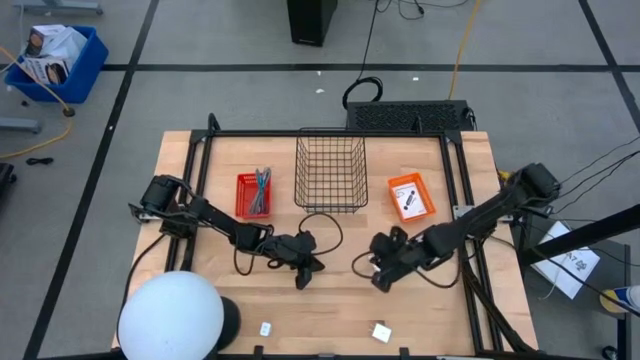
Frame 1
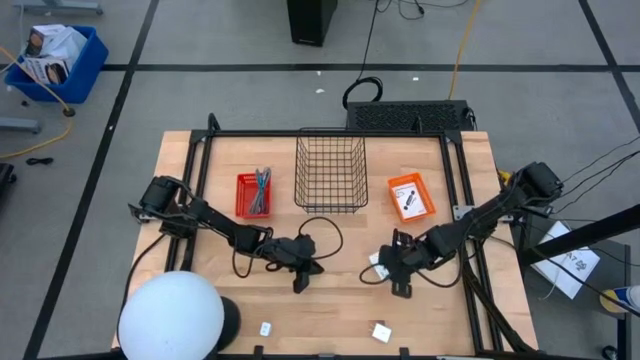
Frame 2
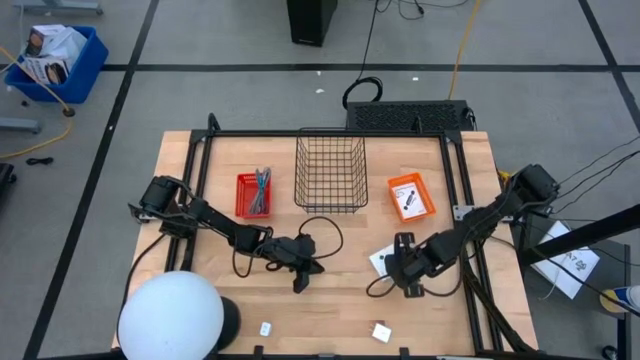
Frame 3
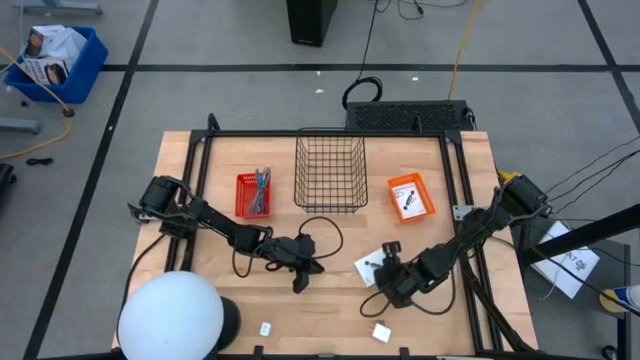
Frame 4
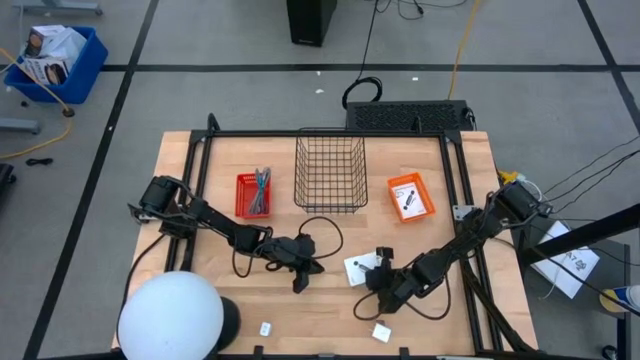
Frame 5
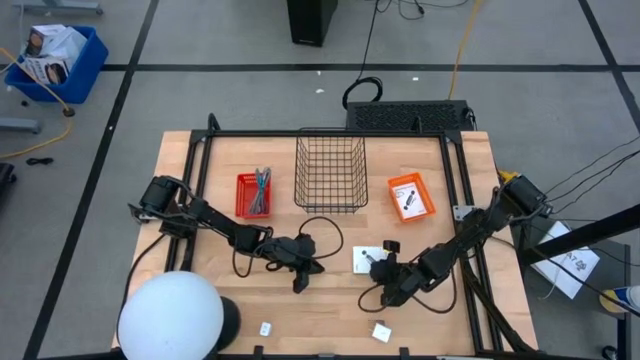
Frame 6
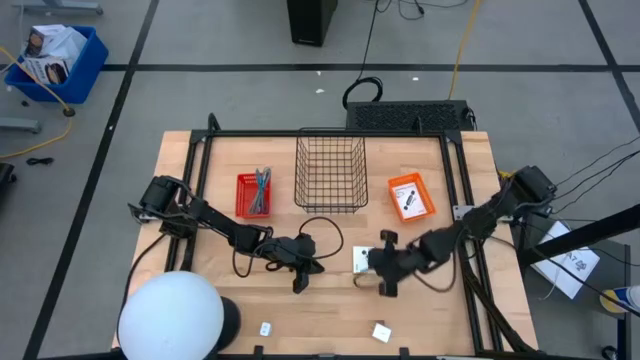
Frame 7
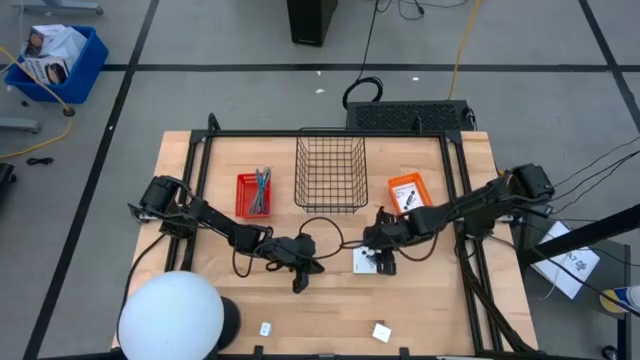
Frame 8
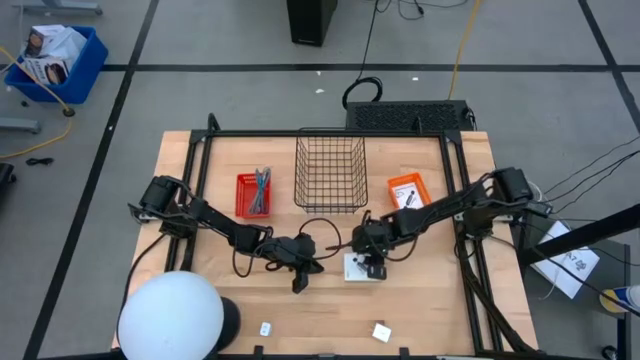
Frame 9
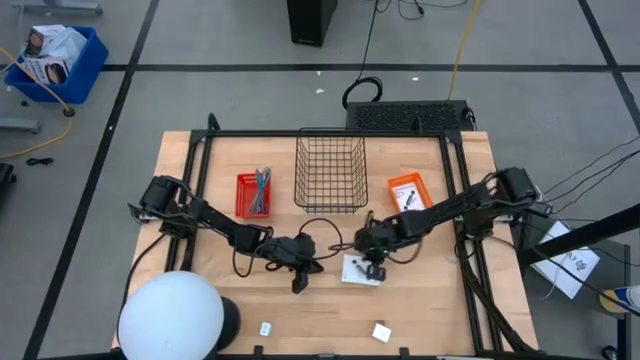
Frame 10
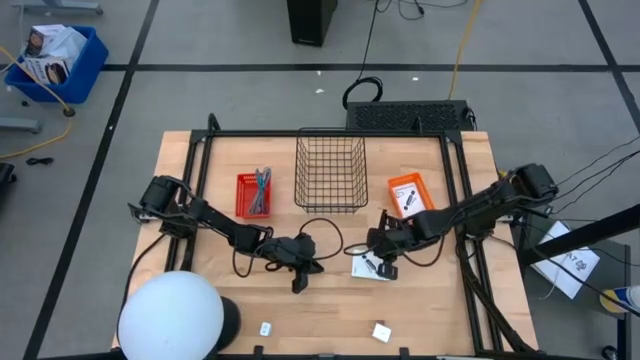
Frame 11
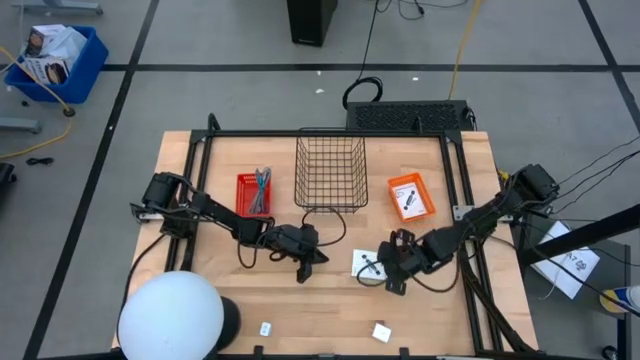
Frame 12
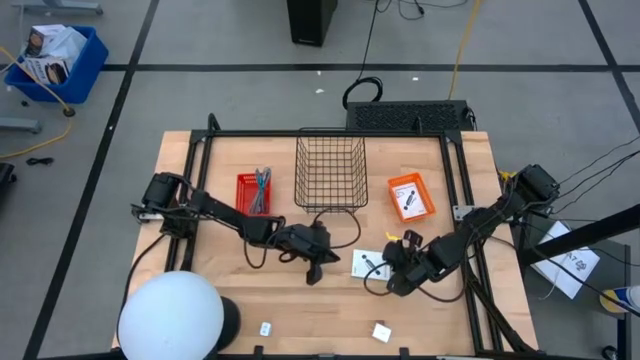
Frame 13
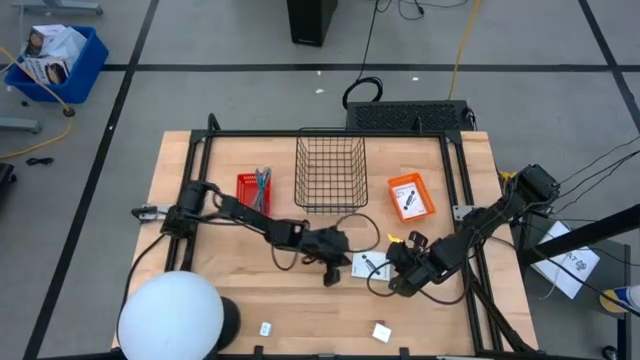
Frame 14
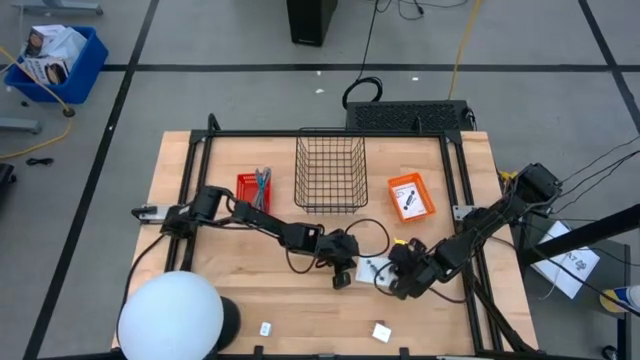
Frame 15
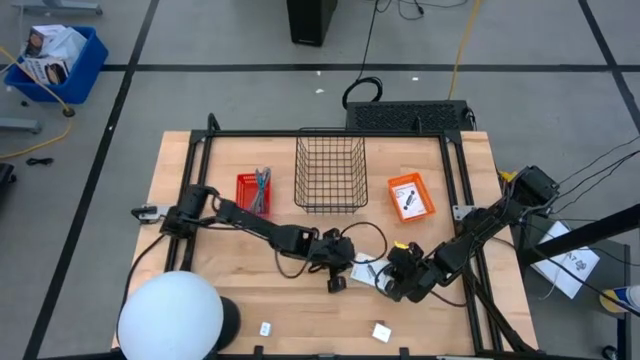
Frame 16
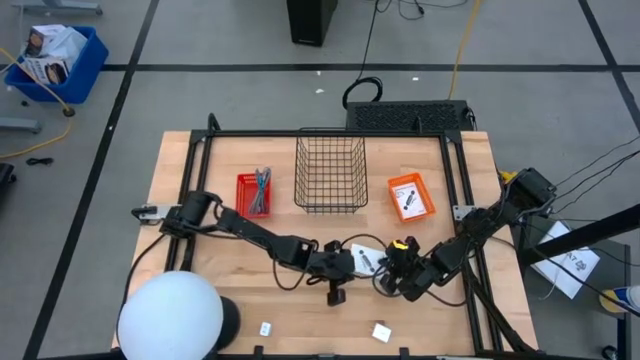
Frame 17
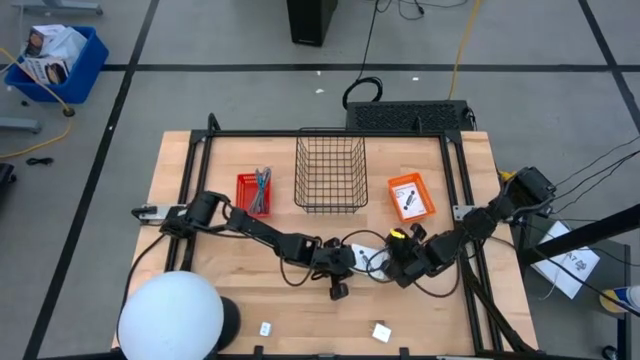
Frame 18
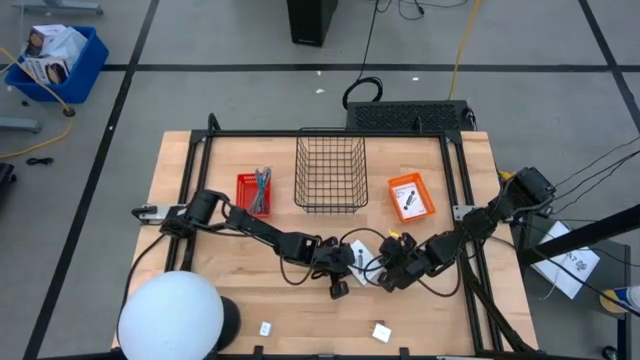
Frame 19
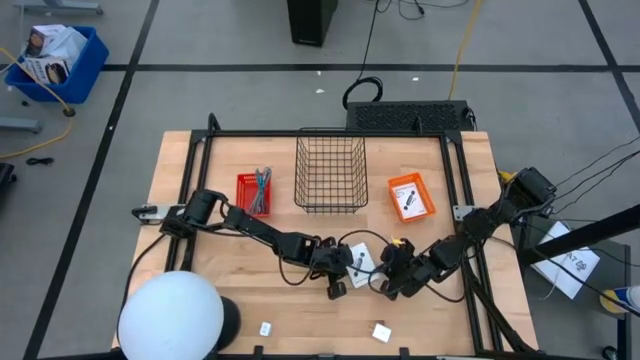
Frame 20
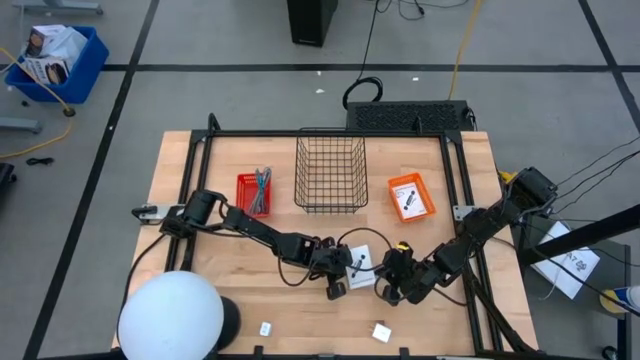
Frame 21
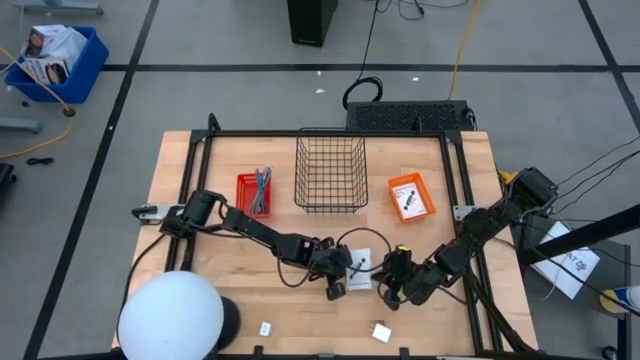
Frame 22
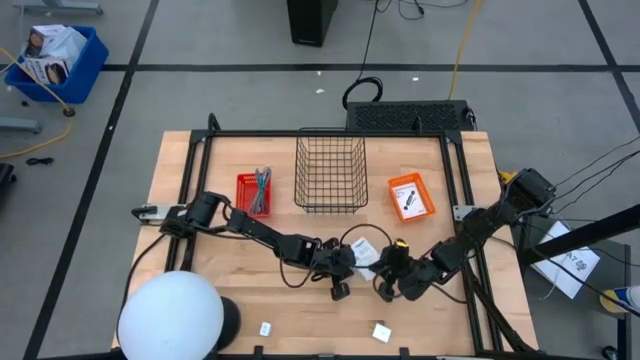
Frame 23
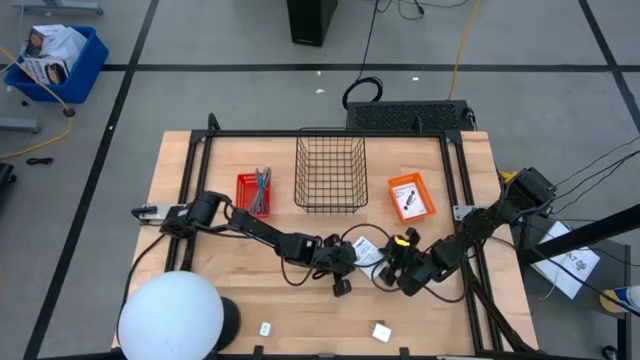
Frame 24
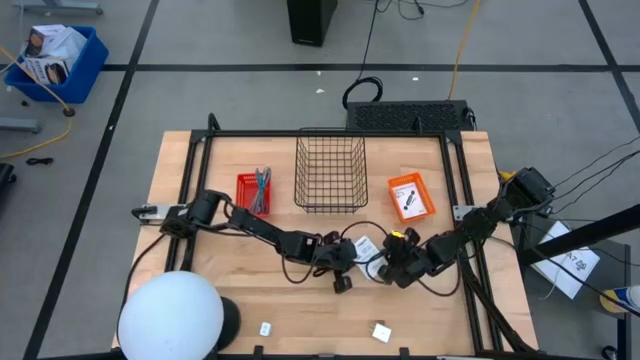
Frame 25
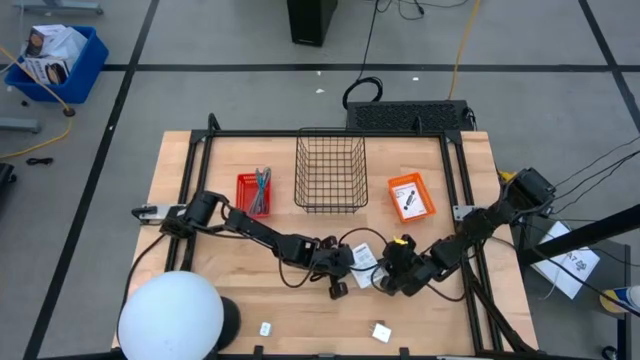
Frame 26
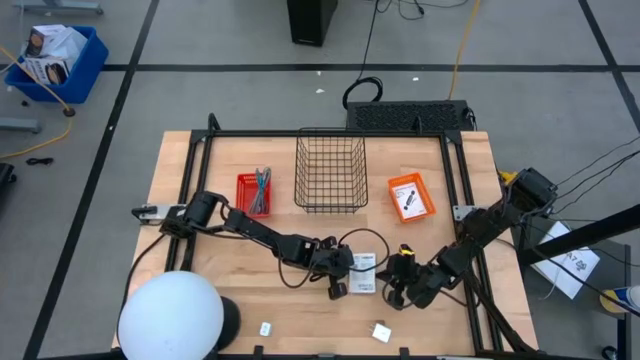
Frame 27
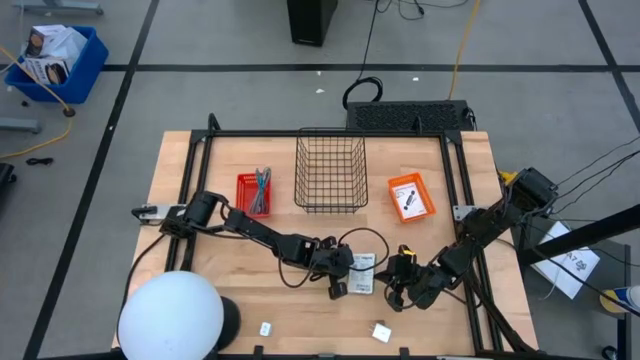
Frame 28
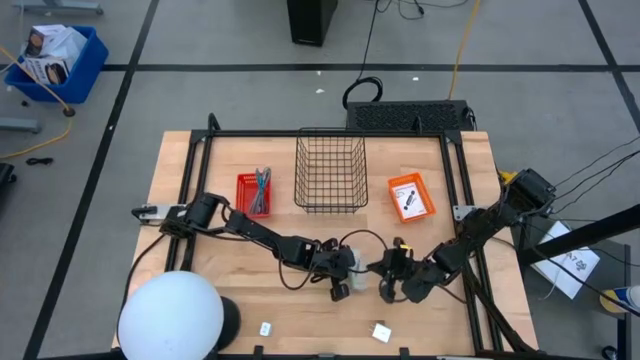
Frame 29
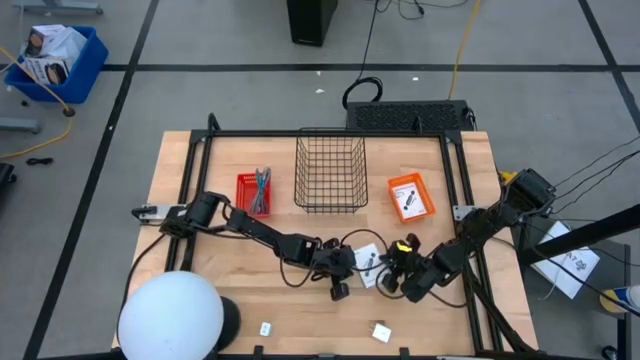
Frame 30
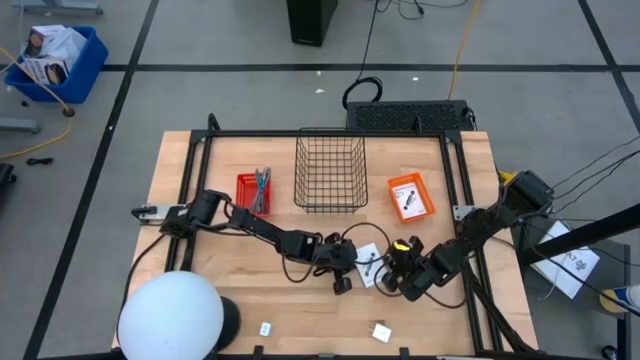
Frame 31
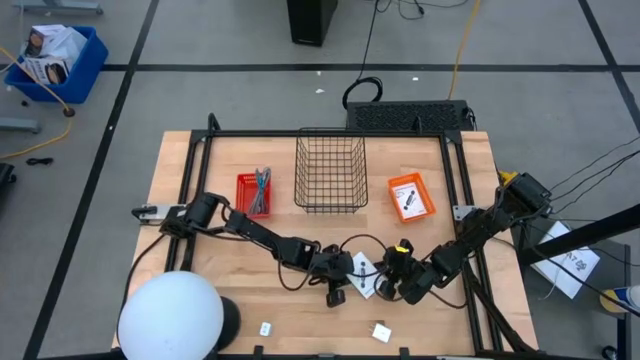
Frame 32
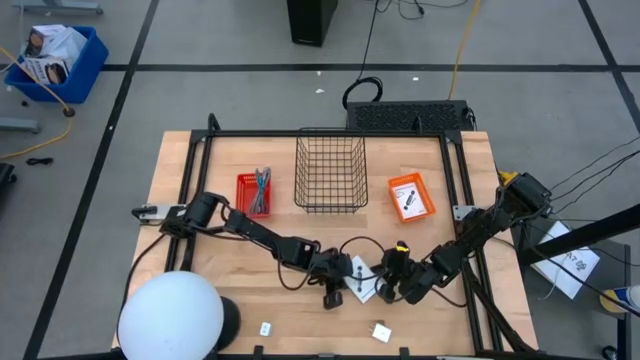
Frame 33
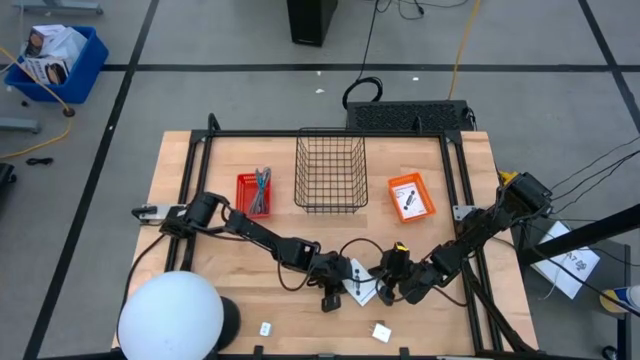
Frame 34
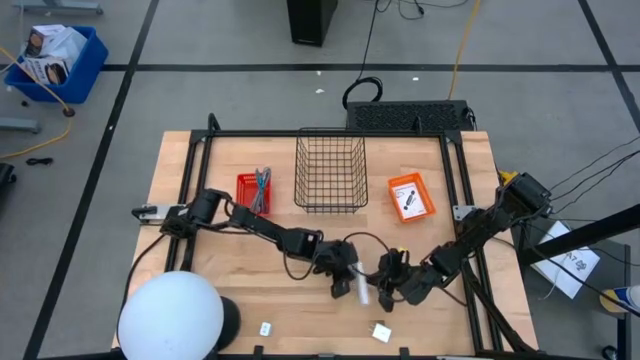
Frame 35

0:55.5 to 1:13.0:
Task: Pick and place items into bin
Put the card reader box into the orange basket
